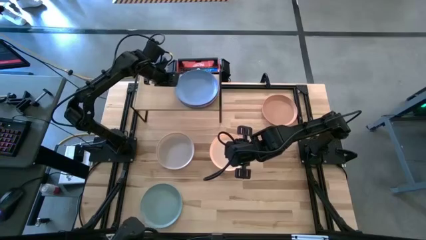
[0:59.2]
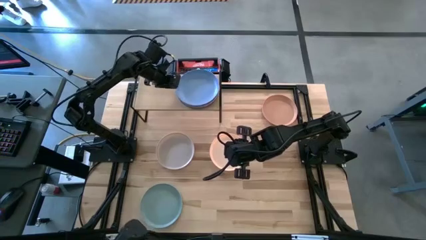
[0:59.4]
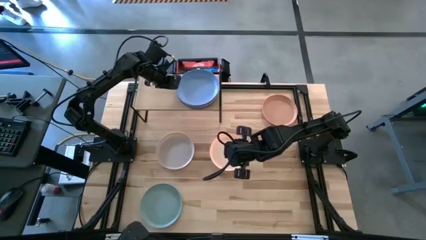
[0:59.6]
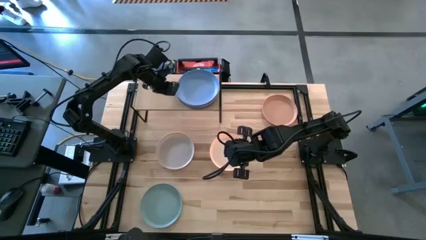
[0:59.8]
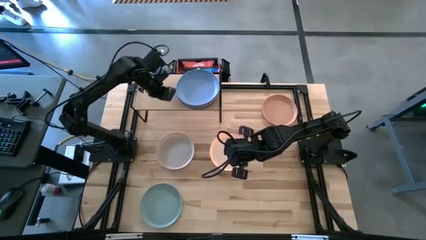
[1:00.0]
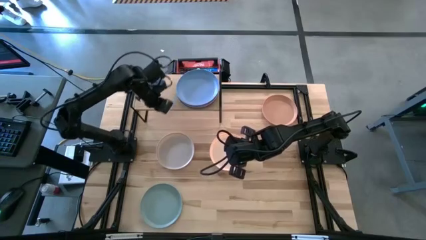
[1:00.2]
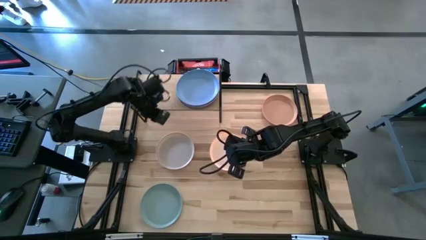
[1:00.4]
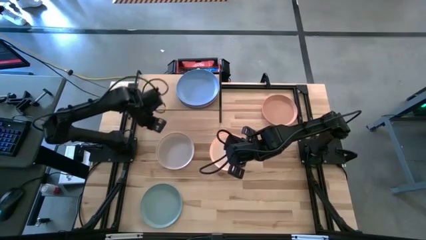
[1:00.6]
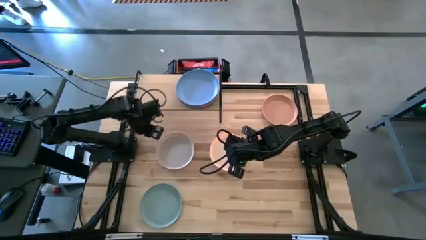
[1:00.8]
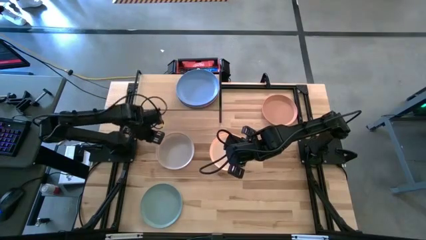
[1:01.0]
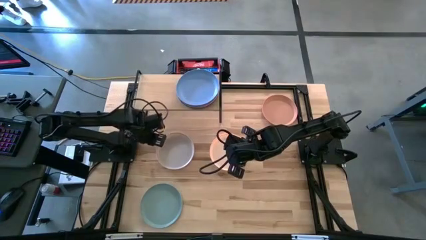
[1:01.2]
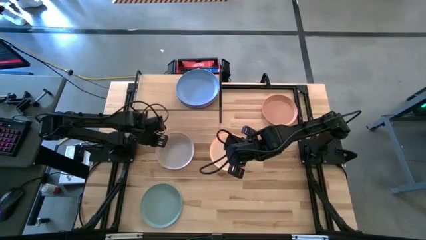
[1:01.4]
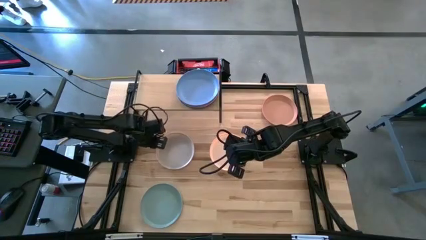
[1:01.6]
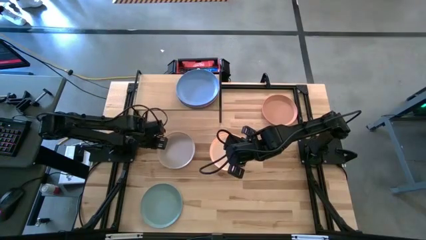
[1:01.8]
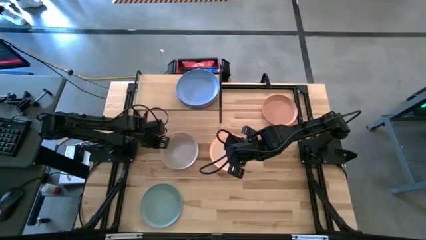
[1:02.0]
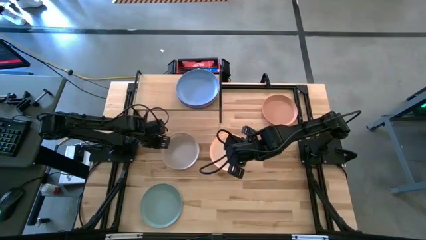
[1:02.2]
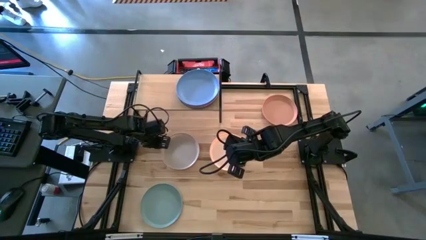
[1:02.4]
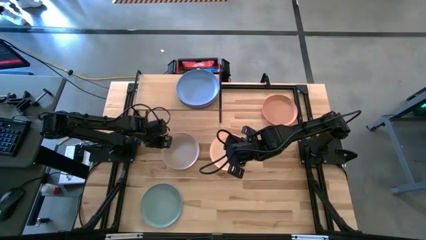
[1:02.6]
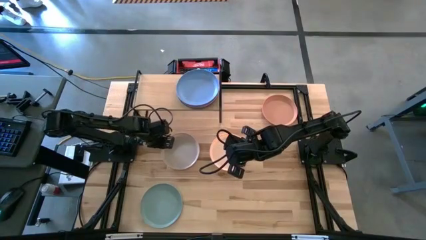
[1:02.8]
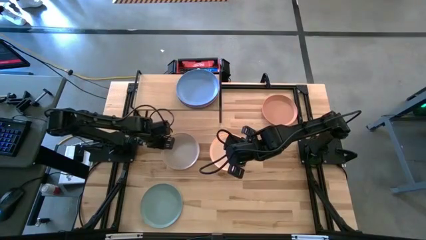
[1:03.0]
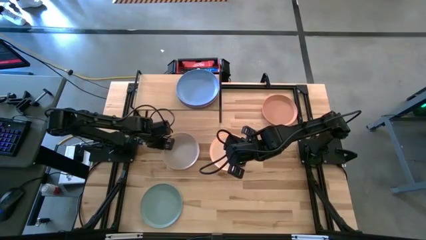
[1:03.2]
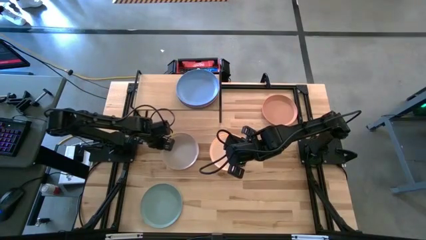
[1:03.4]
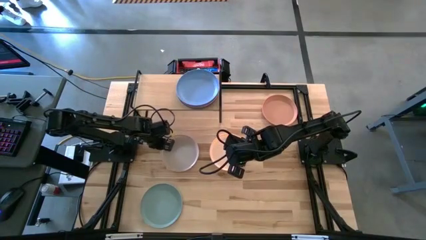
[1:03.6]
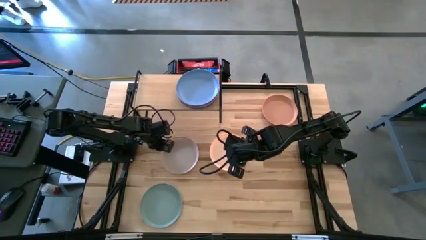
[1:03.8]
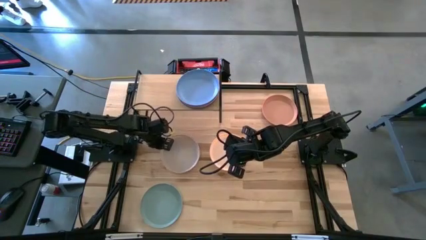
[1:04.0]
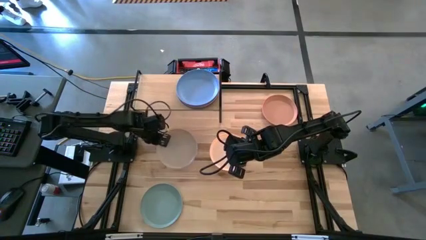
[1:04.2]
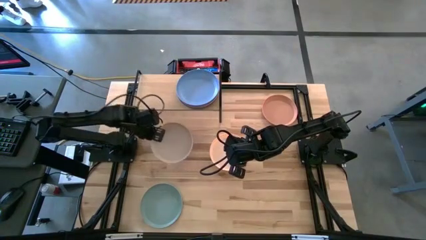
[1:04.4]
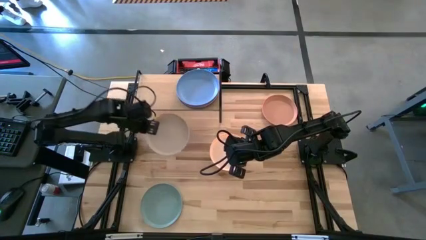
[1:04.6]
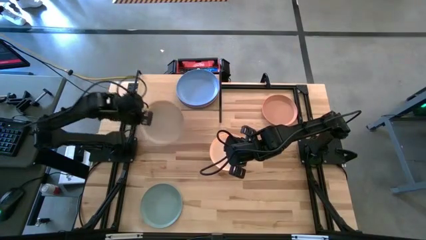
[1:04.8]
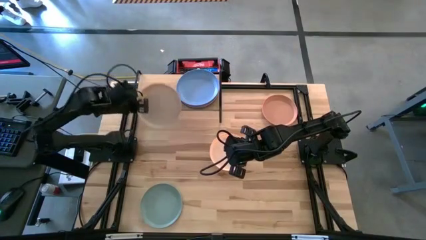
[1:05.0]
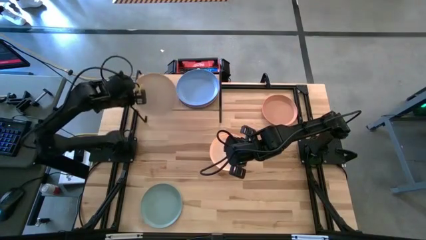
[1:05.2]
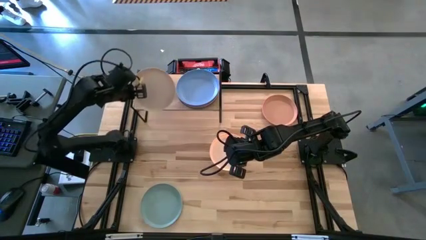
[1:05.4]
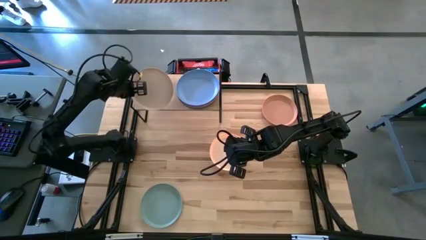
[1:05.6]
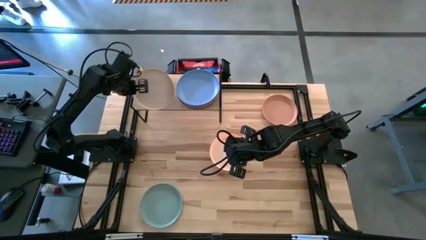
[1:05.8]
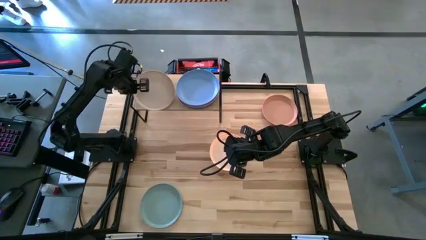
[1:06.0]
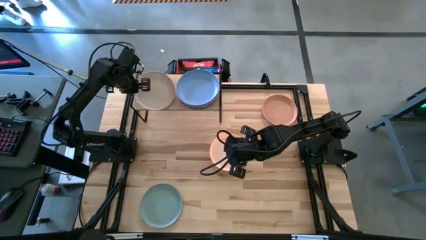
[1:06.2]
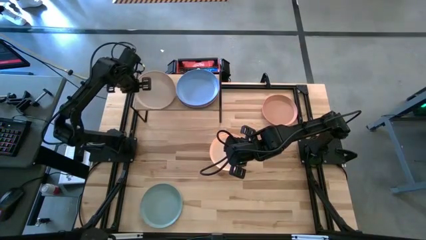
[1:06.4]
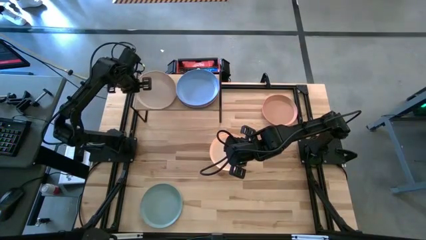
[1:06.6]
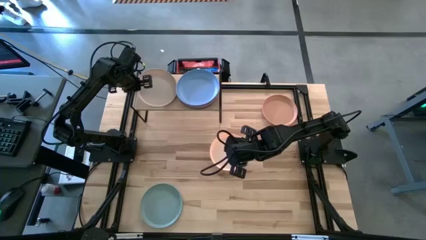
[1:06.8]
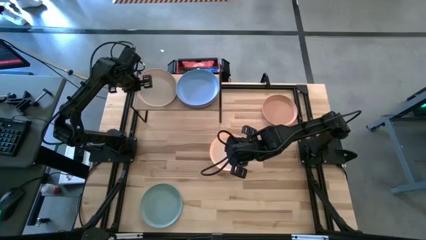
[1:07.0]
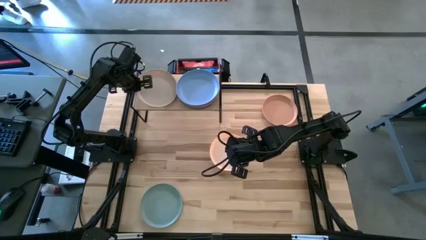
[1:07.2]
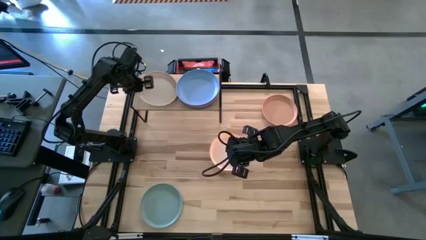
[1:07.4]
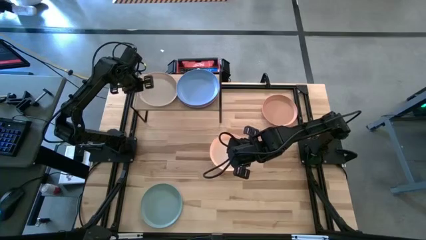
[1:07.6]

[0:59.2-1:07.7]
Task: Place and stack plates onto a shelf
Put the white plate on the shelf

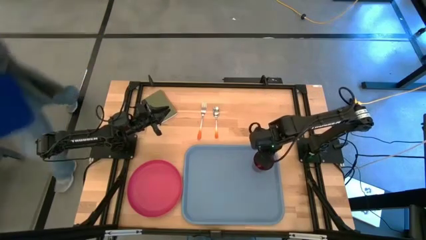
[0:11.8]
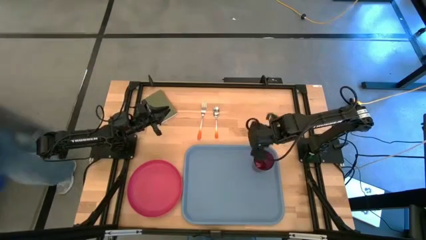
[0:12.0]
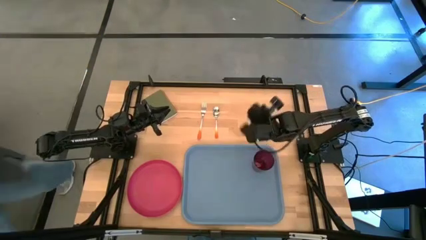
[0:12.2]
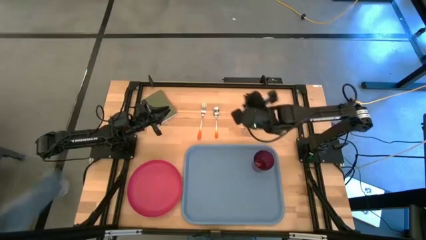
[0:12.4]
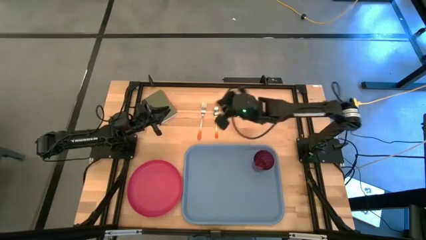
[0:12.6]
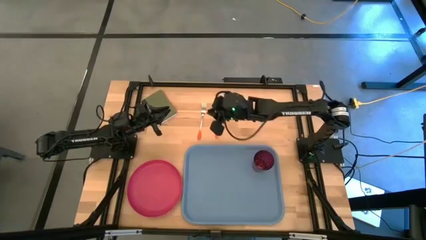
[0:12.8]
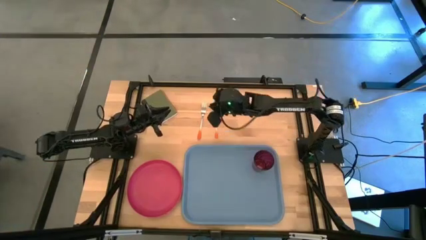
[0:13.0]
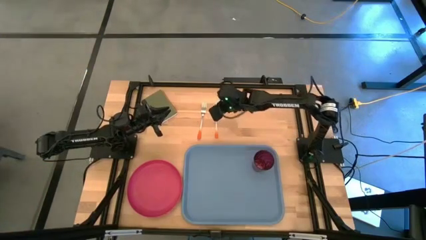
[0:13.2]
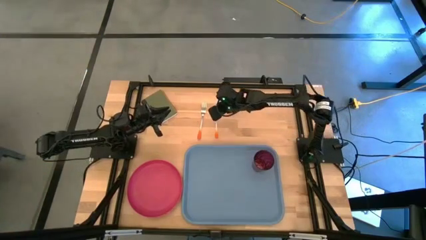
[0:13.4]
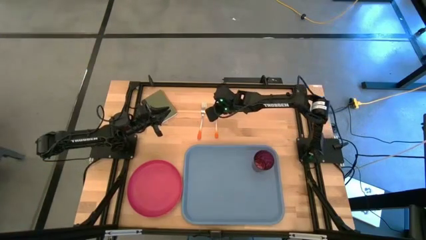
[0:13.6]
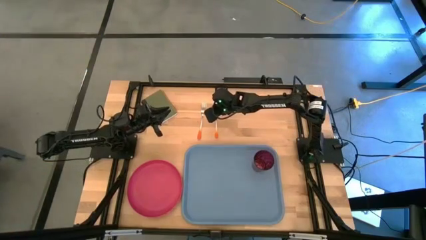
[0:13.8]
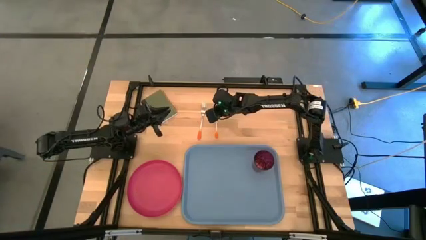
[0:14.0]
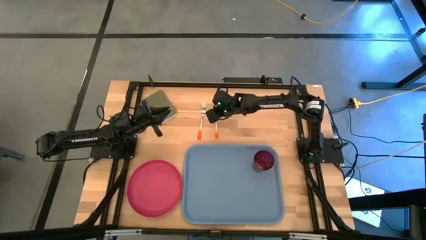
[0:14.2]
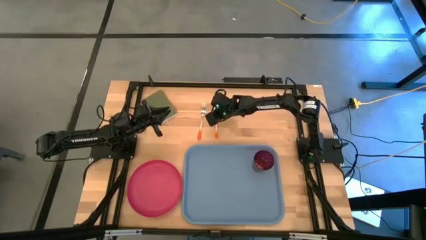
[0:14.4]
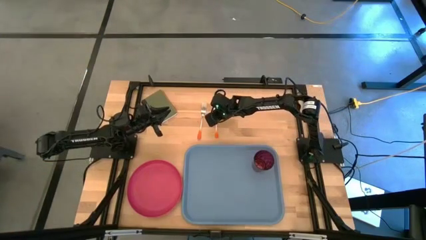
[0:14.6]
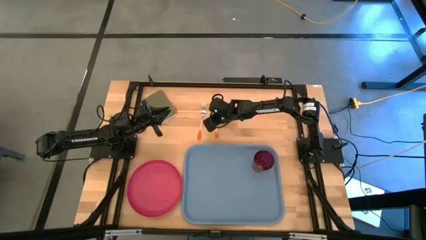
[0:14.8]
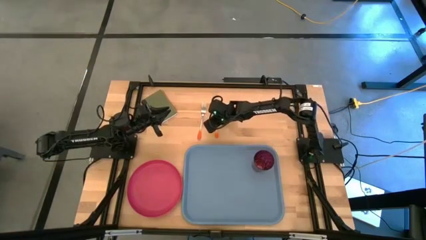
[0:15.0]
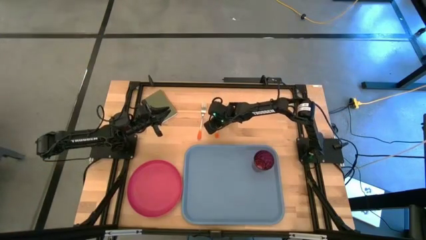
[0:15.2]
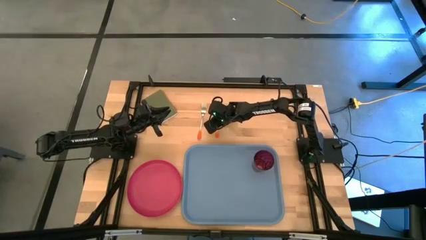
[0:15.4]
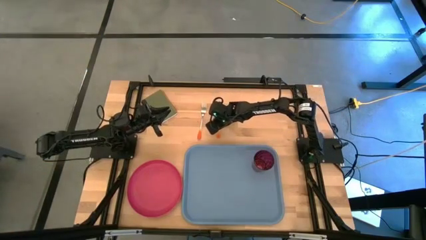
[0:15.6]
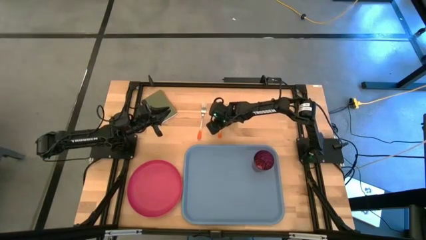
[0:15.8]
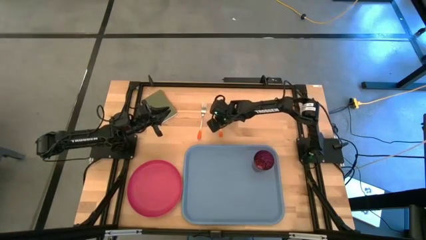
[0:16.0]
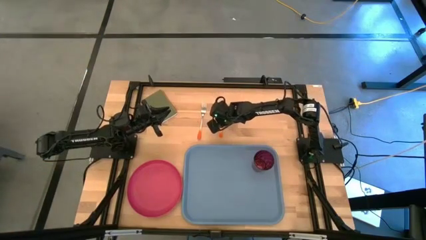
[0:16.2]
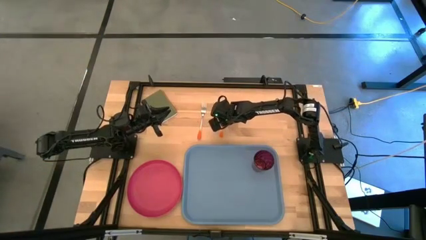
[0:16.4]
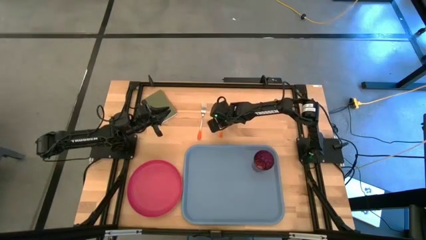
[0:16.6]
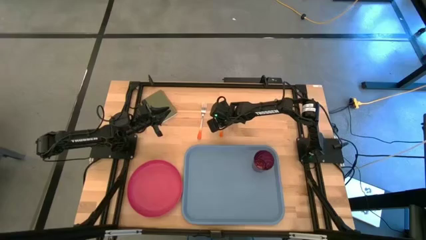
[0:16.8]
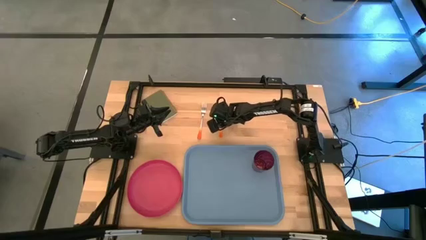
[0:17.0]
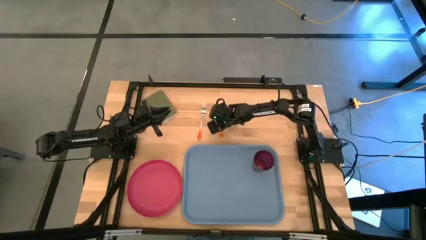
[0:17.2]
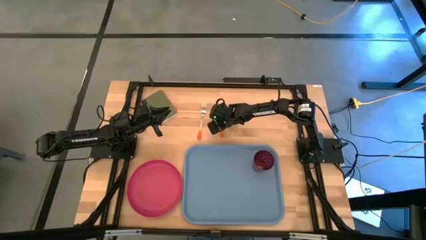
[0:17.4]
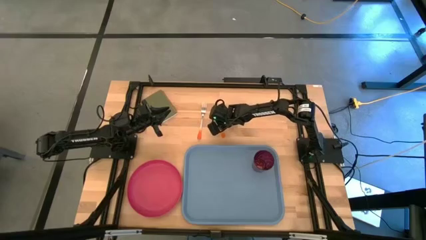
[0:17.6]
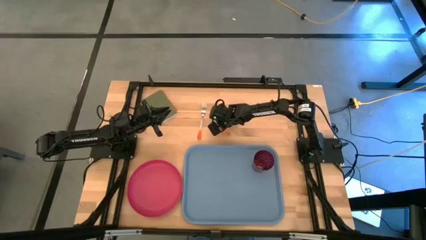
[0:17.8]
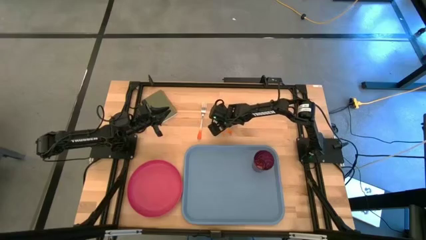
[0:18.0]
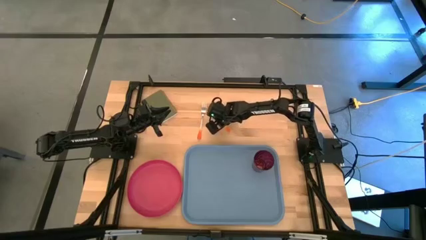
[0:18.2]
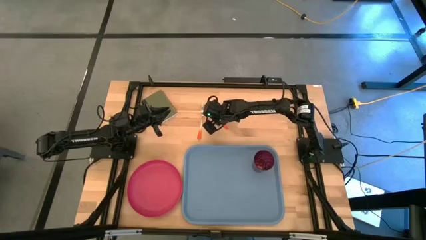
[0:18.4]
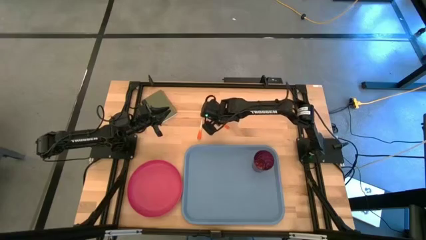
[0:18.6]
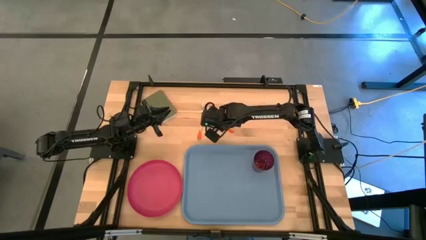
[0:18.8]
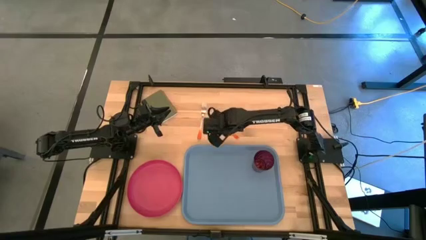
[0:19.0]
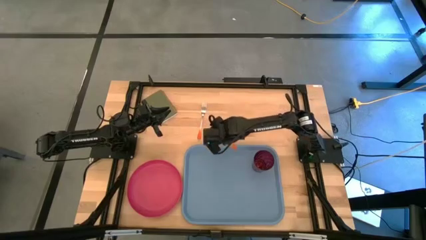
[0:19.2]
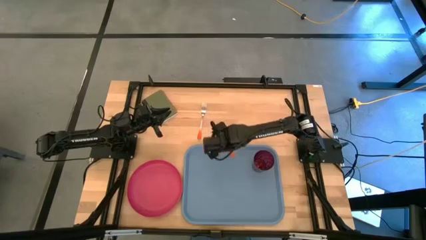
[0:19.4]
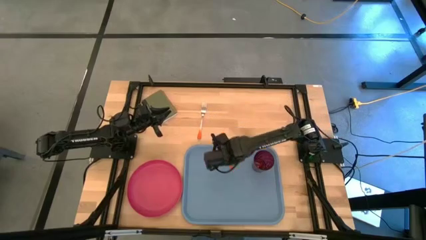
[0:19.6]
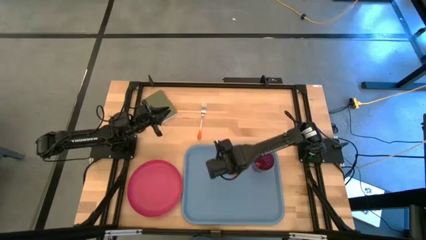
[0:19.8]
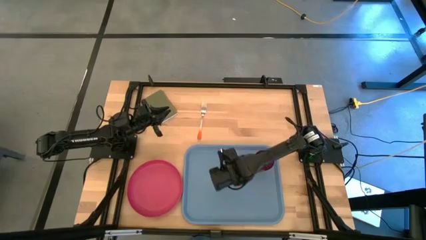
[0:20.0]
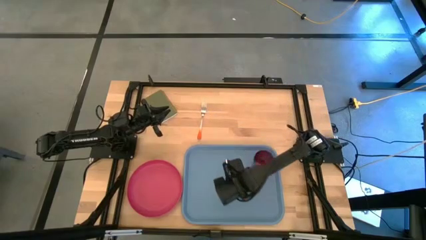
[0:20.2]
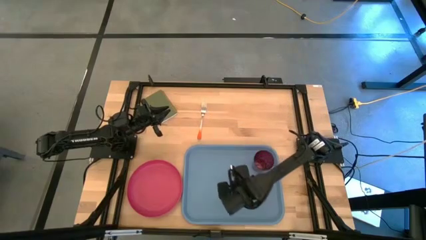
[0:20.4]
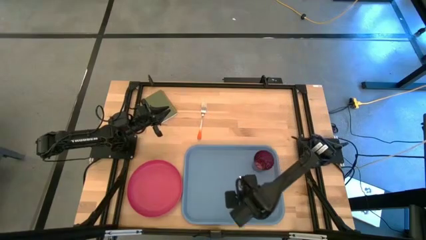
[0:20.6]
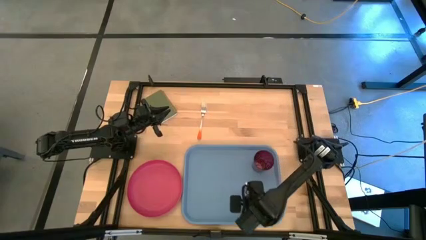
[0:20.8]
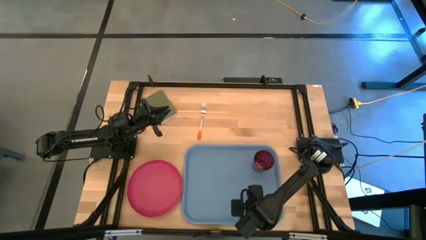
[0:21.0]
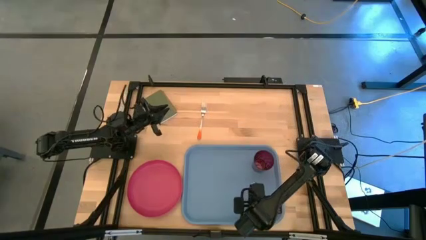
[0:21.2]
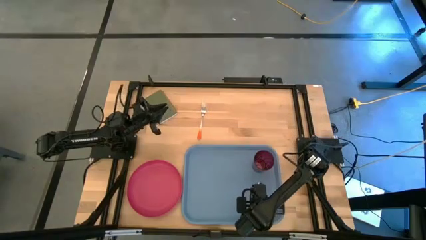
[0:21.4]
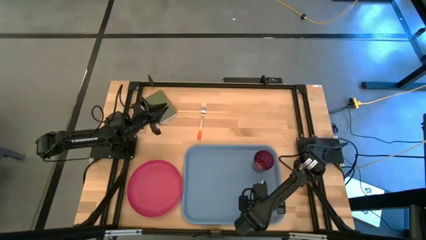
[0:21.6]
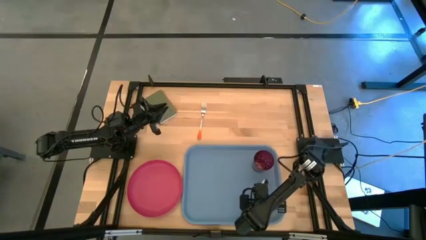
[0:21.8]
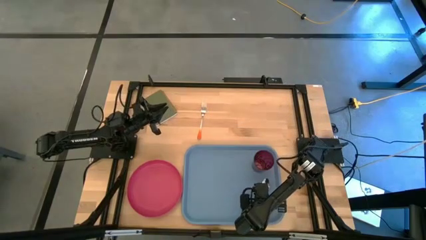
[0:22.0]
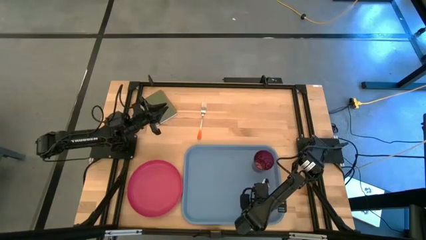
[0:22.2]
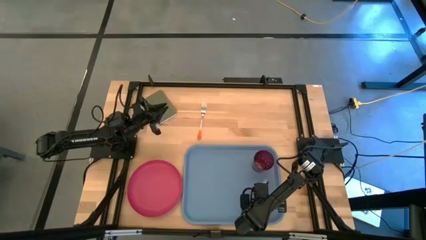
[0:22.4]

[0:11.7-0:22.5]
Task: Pick and place plate/cup/fork/spoon on tray
Put the orange spoon on the blue serving tray at the bottom of the red glass
